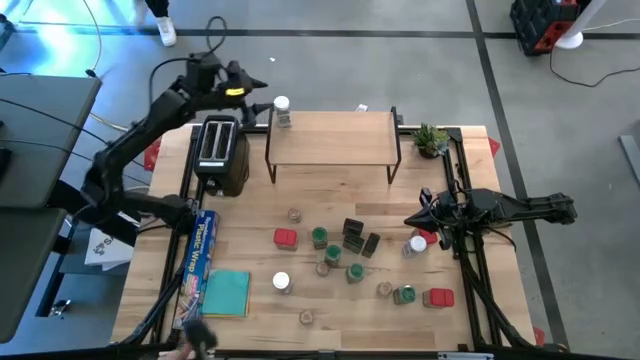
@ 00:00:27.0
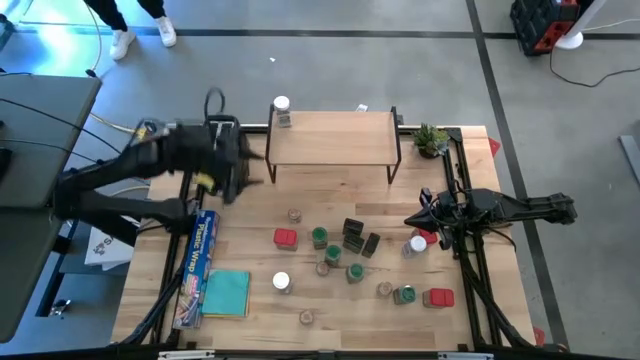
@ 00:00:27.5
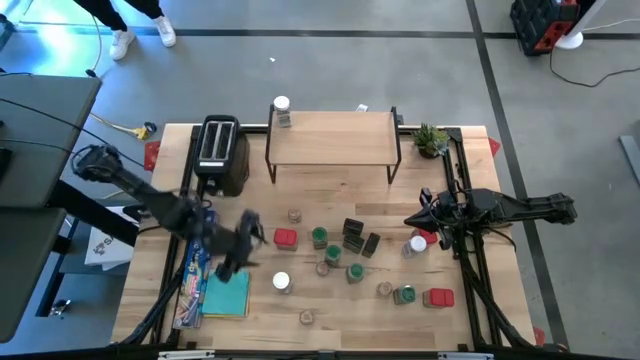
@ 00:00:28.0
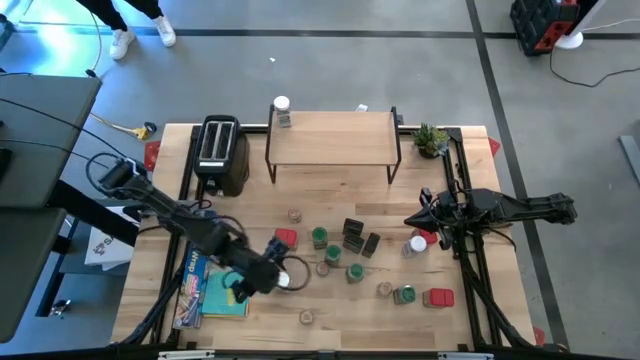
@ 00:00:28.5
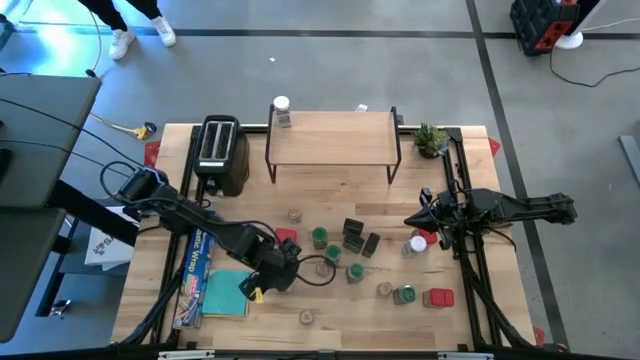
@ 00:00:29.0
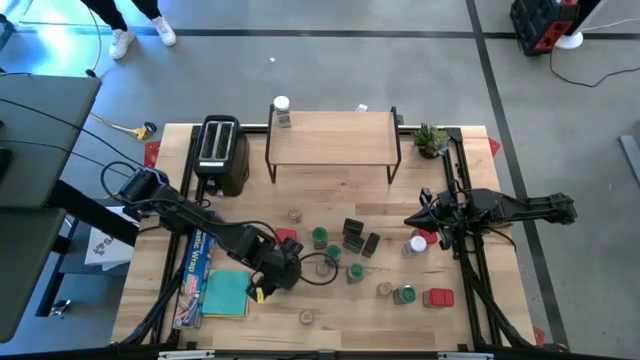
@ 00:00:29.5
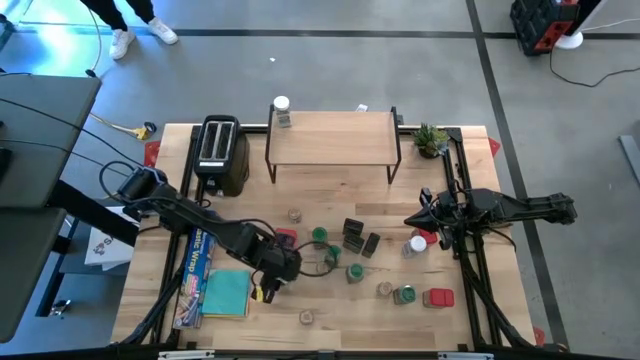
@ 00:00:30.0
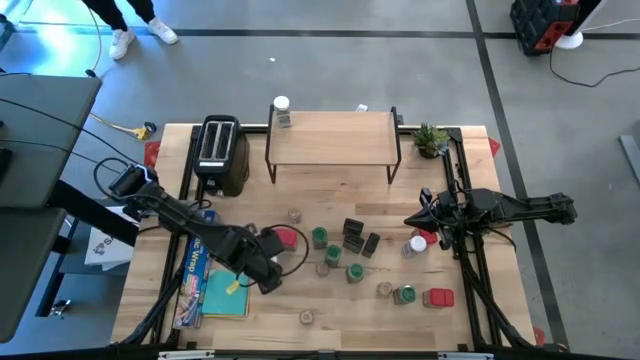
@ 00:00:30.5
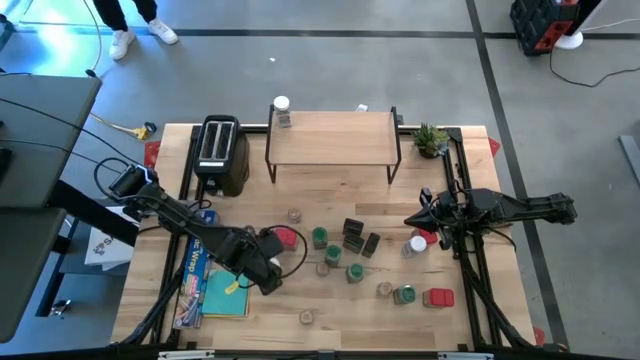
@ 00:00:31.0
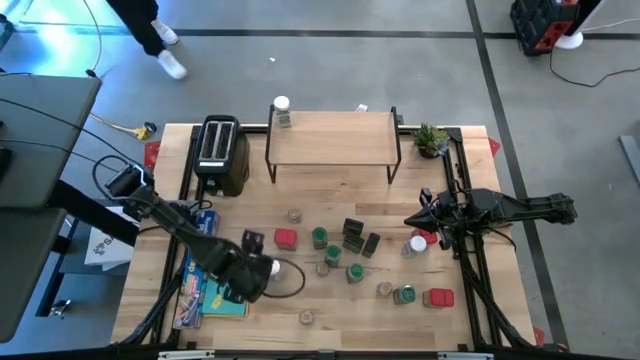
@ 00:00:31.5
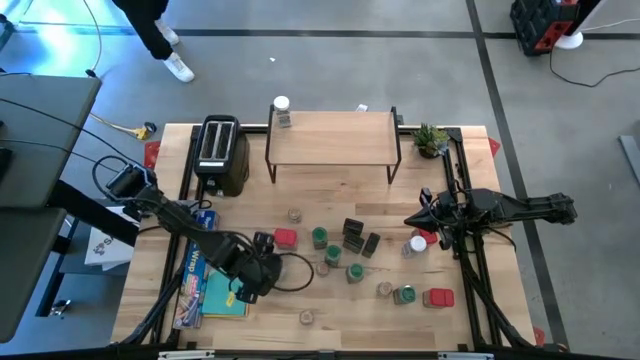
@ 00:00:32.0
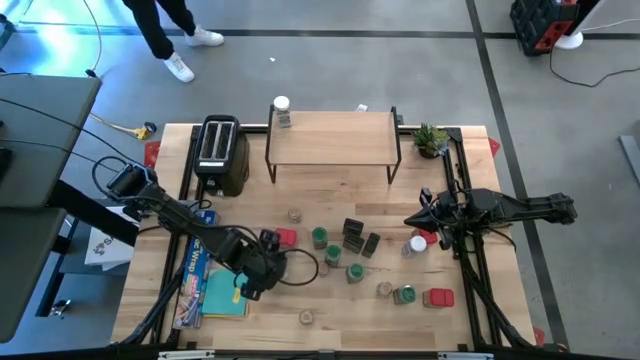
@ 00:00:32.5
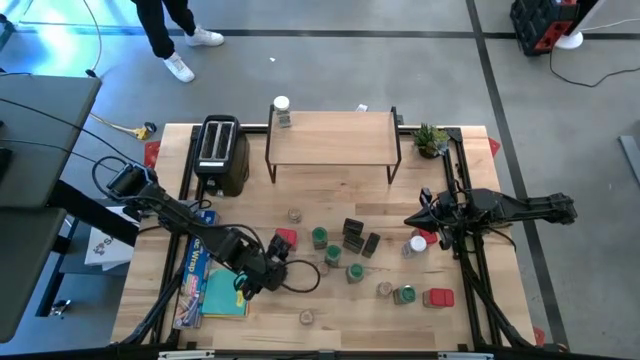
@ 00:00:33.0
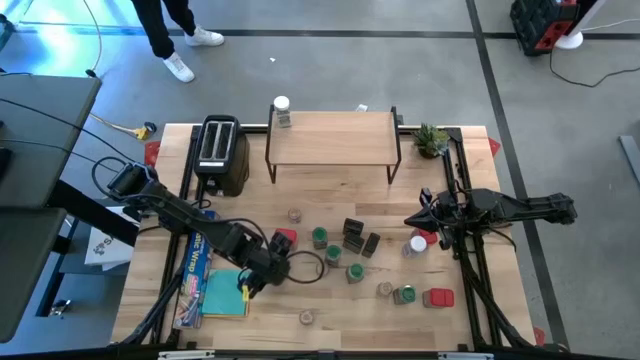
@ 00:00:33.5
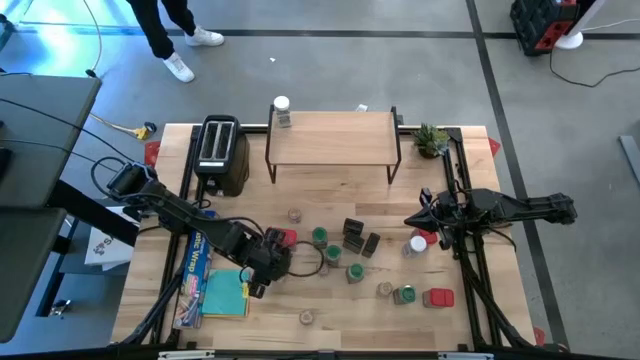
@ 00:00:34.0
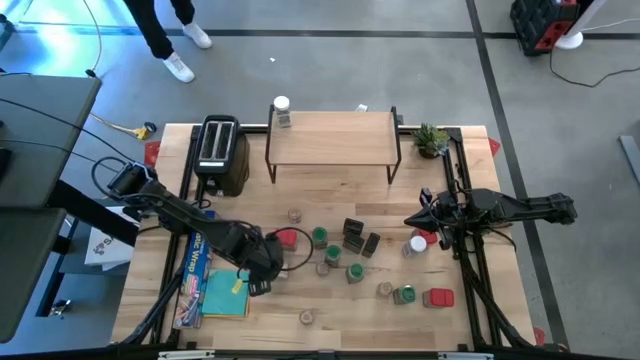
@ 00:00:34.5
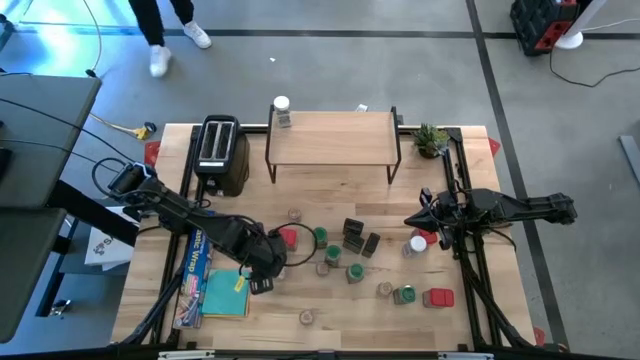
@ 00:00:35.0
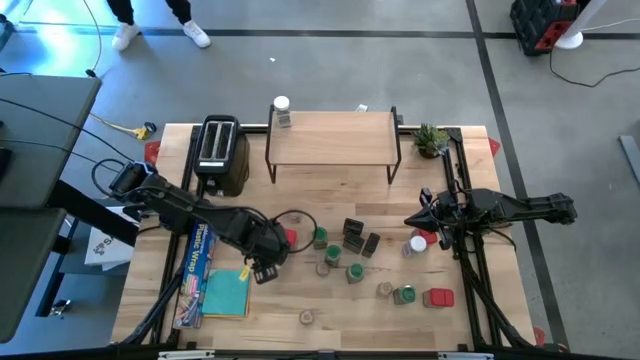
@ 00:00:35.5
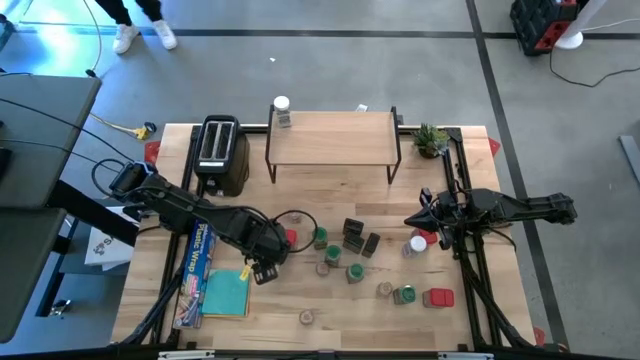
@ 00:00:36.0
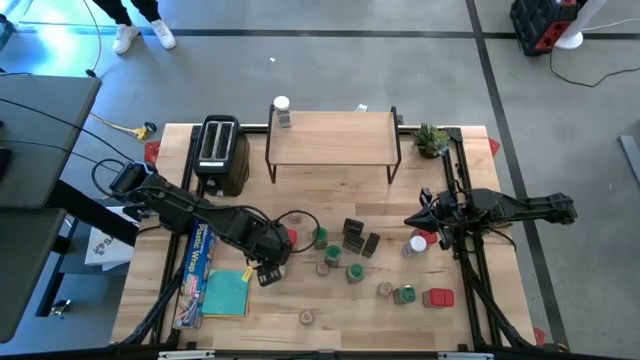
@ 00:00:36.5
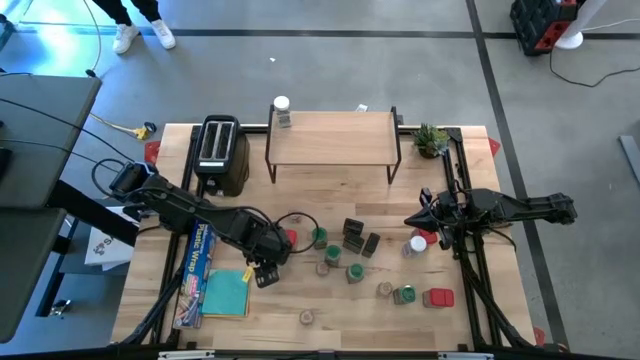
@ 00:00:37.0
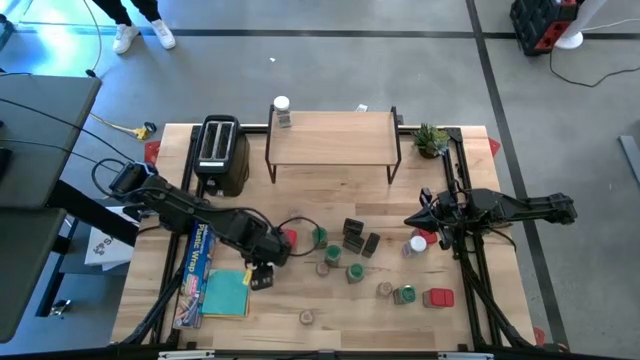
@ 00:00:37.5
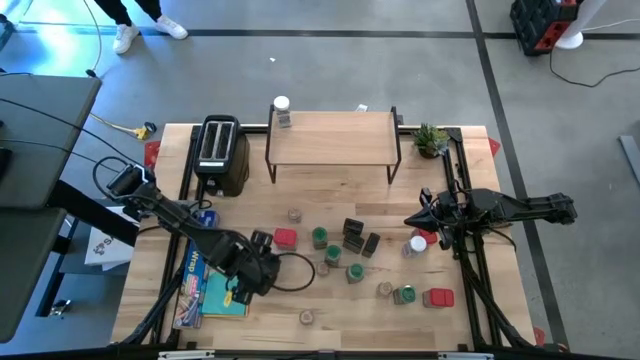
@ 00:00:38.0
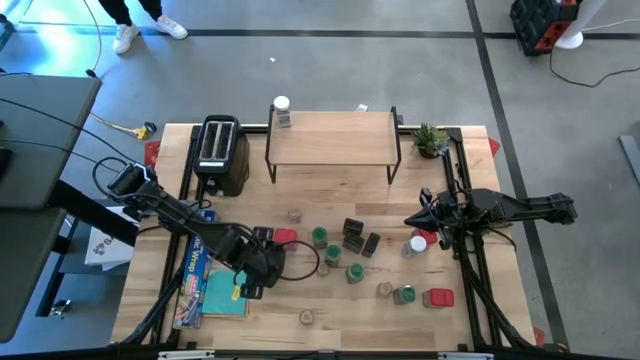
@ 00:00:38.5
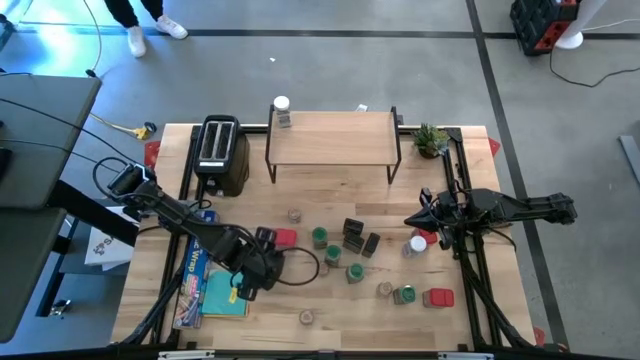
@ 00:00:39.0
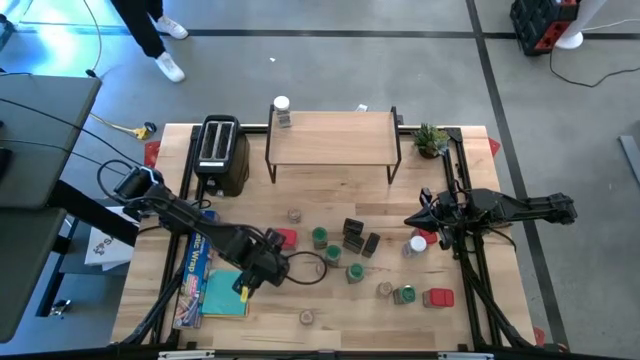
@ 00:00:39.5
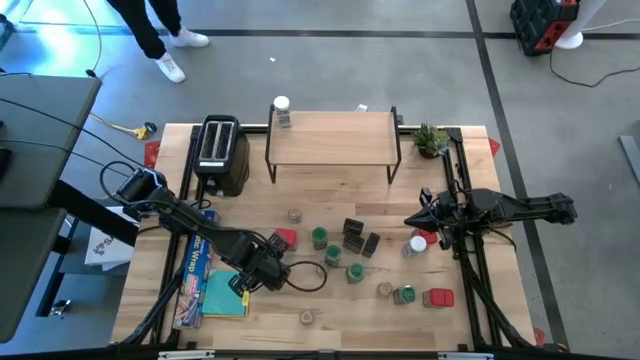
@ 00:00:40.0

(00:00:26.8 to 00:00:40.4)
Task: Shelf spices
Put the left white seasoning bottle on the shelf aligned with the other white seasoning bottle

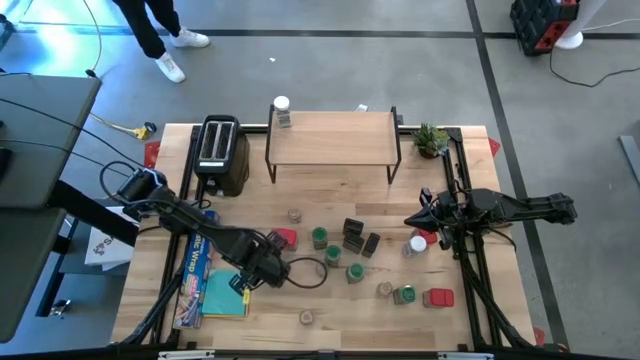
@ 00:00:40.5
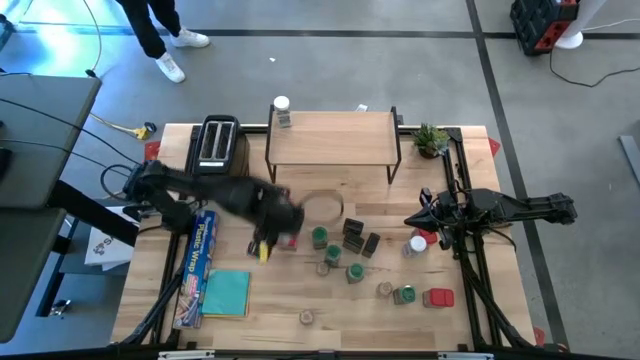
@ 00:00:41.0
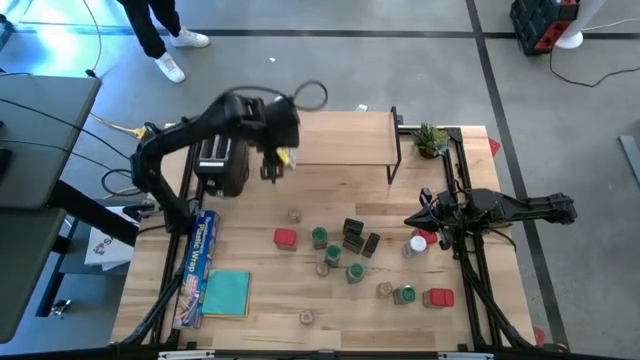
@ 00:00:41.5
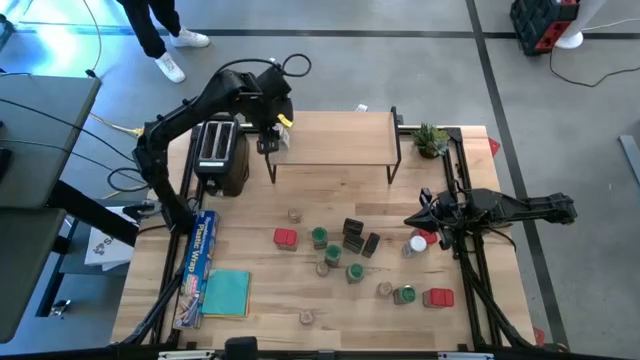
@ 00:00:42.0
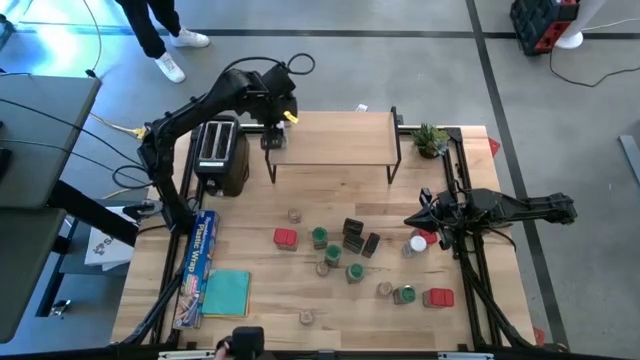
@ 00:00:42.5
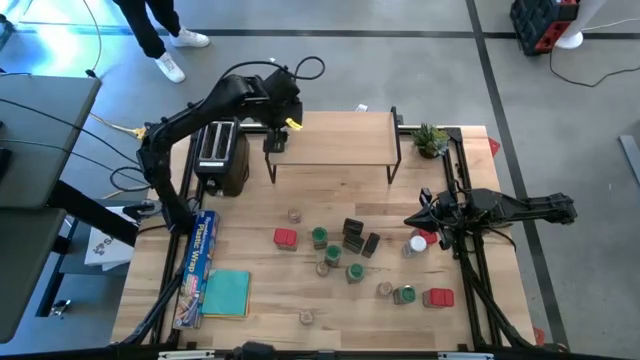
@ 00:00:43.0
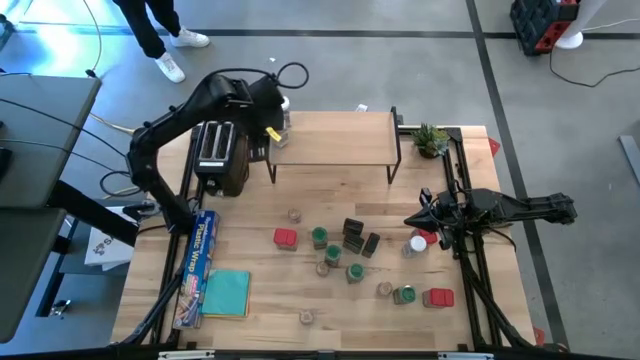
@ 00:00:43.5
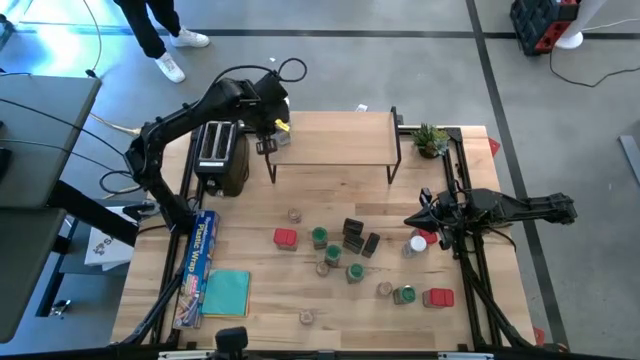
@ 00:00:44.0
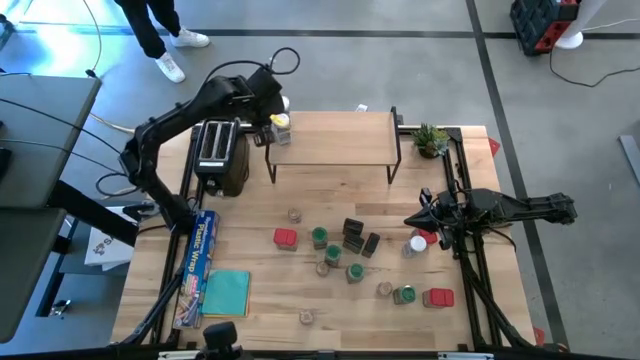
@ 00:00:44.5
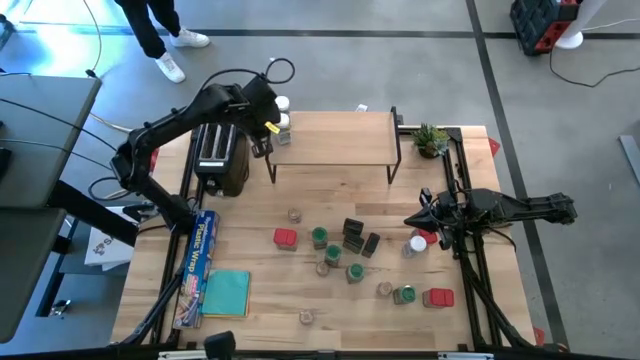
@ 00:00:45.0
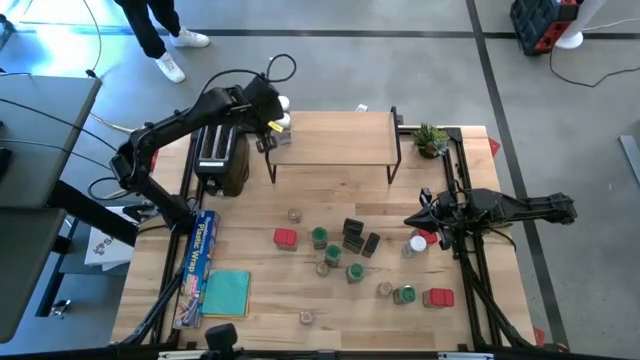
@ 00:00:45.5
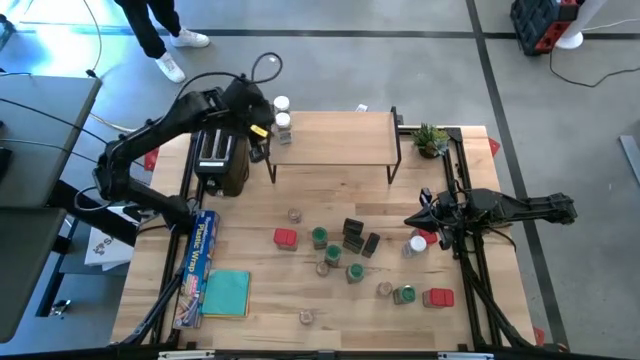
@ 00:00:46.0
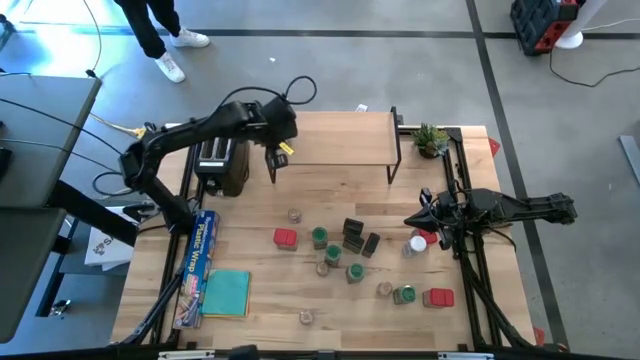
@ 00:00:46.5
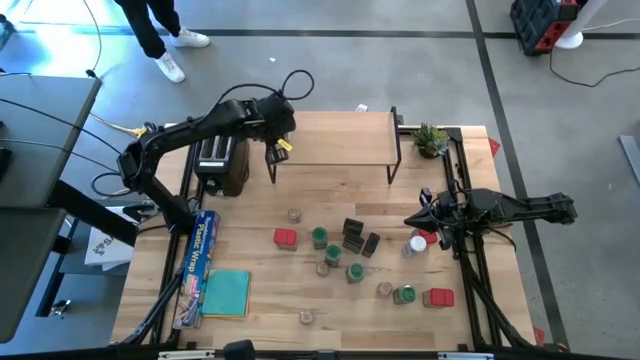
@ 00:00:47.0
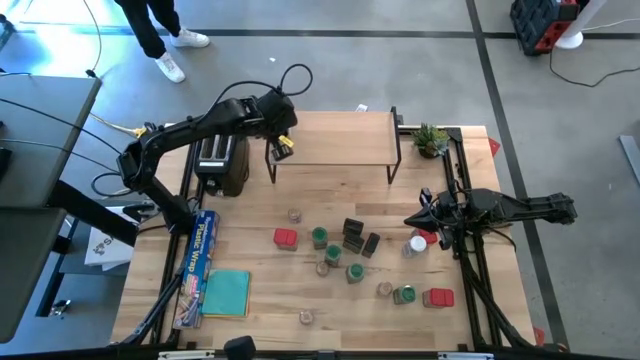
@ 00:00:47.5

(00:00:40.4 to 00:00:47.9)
Put the left white seasoning bottle on the shelf aligned with the other white seasoning bottle
